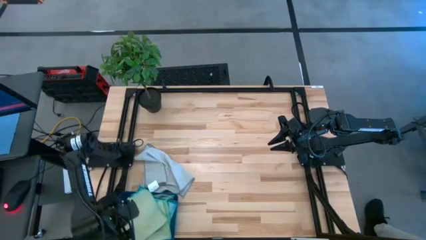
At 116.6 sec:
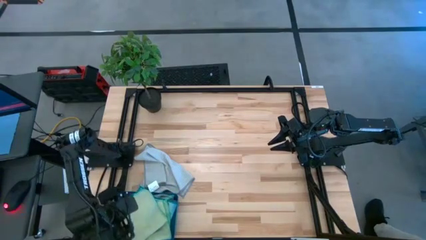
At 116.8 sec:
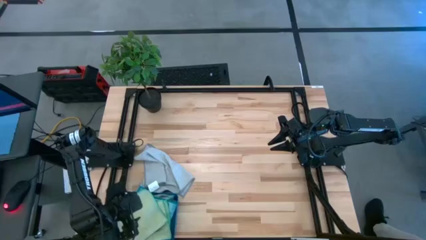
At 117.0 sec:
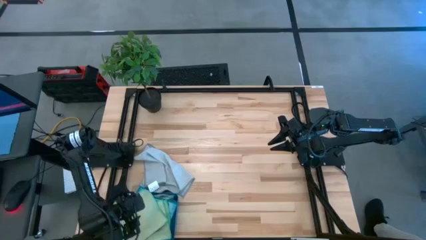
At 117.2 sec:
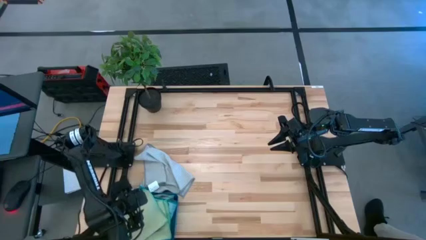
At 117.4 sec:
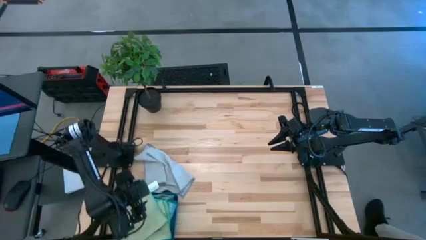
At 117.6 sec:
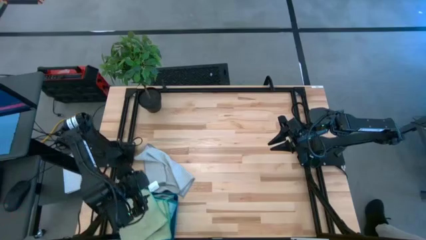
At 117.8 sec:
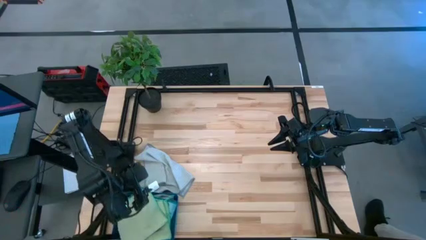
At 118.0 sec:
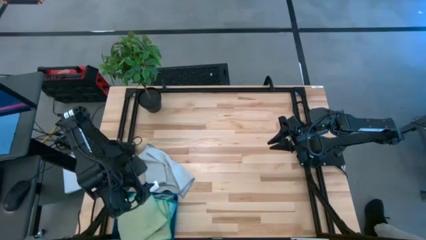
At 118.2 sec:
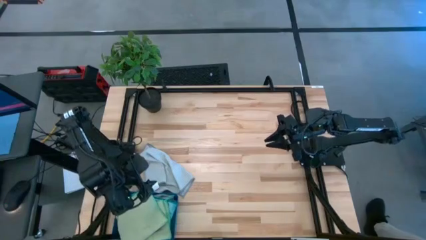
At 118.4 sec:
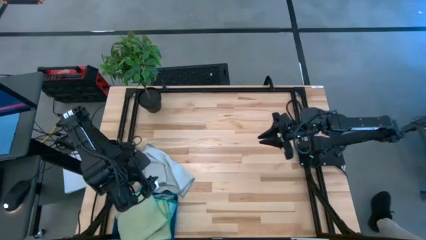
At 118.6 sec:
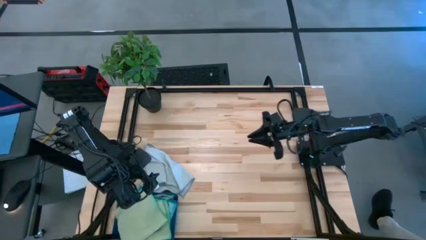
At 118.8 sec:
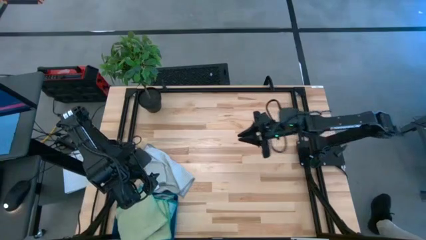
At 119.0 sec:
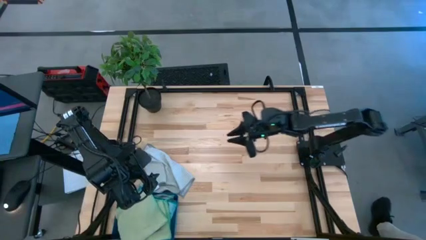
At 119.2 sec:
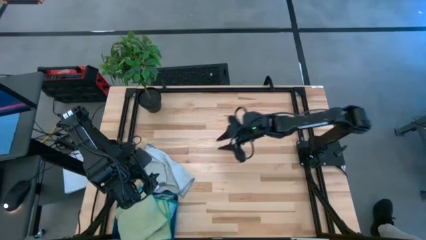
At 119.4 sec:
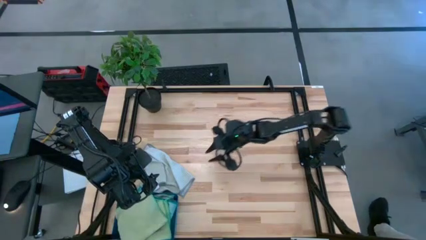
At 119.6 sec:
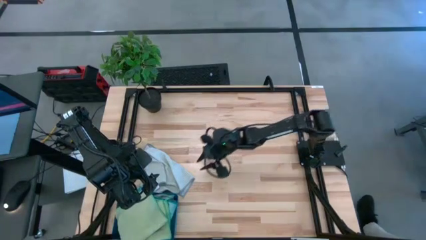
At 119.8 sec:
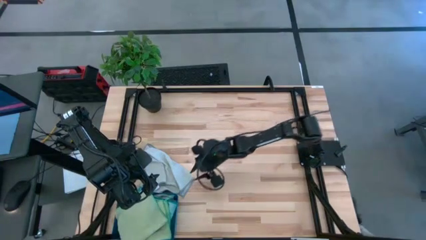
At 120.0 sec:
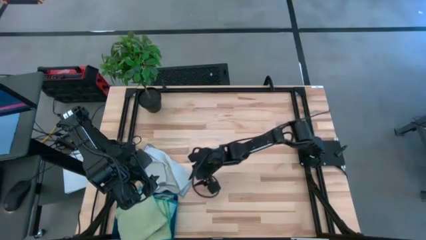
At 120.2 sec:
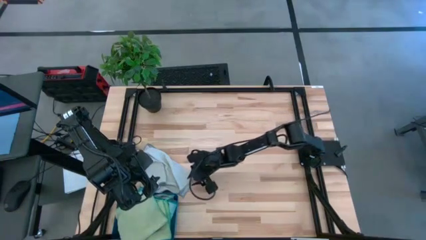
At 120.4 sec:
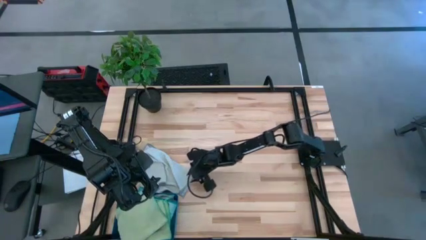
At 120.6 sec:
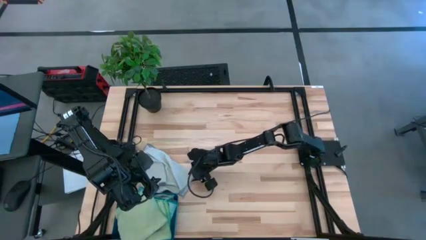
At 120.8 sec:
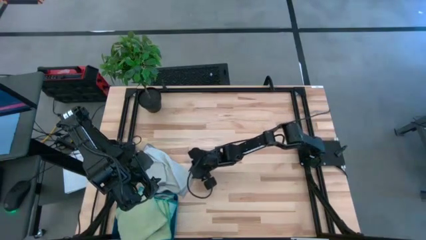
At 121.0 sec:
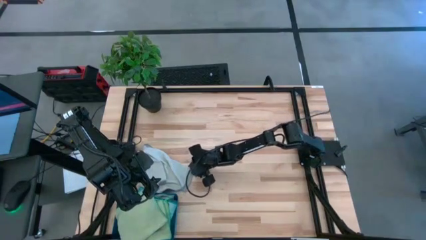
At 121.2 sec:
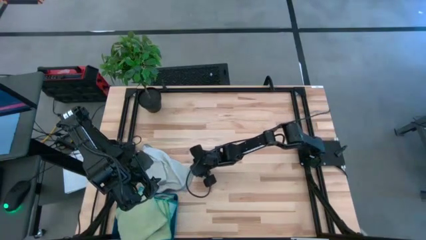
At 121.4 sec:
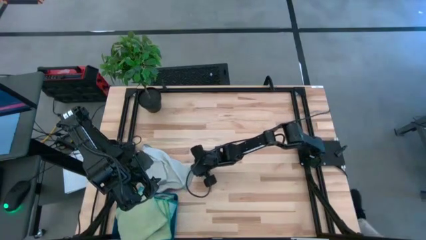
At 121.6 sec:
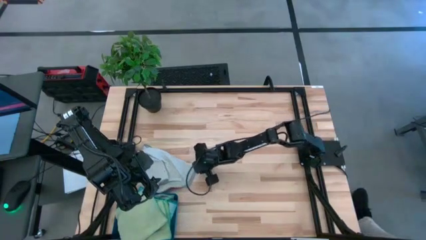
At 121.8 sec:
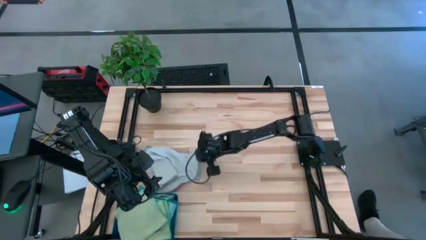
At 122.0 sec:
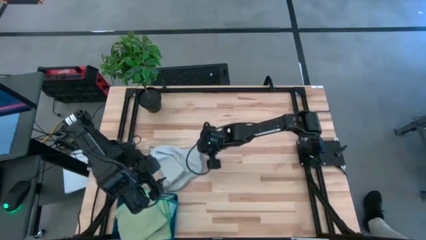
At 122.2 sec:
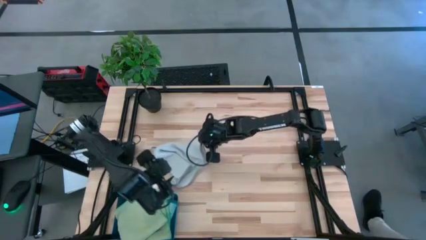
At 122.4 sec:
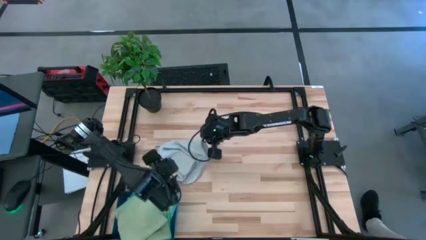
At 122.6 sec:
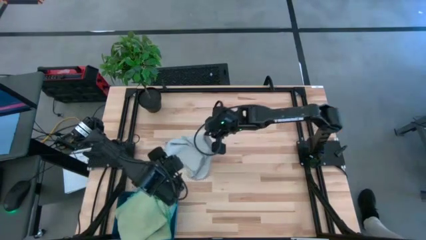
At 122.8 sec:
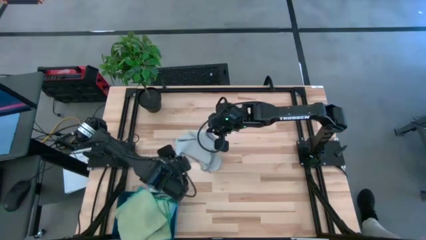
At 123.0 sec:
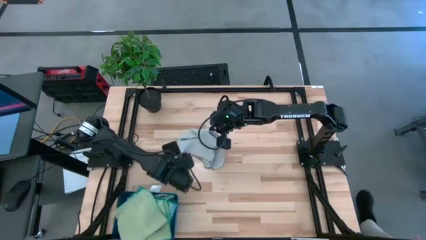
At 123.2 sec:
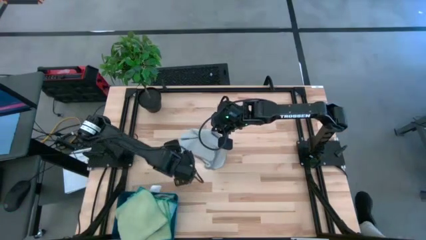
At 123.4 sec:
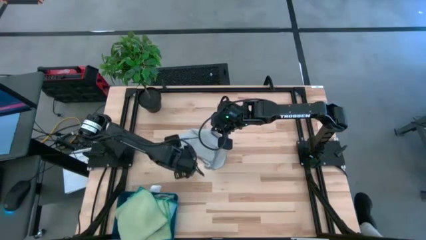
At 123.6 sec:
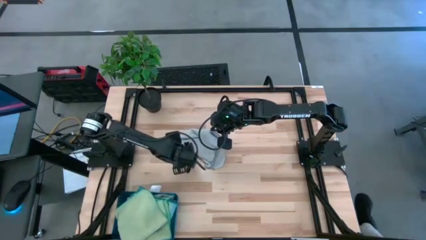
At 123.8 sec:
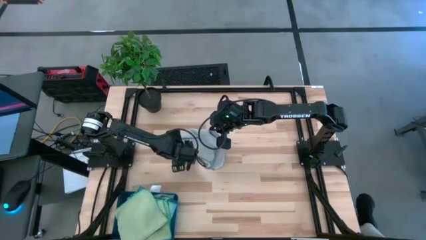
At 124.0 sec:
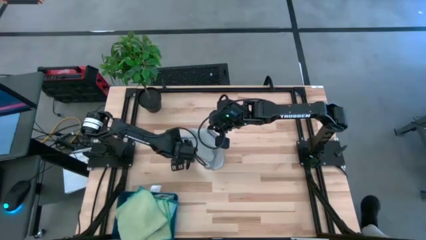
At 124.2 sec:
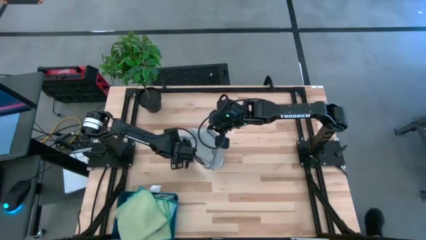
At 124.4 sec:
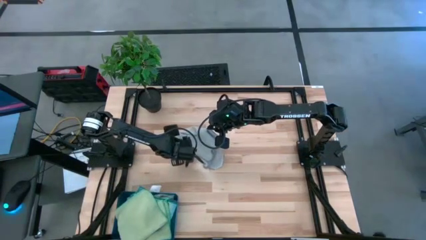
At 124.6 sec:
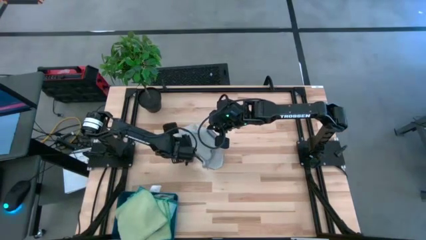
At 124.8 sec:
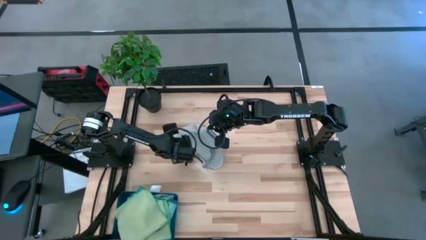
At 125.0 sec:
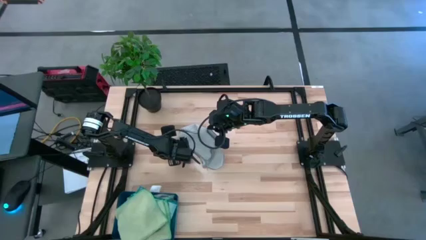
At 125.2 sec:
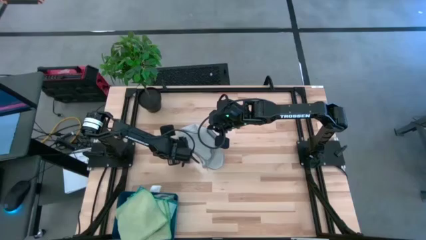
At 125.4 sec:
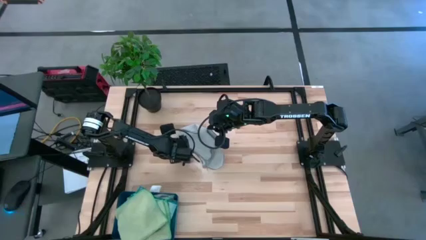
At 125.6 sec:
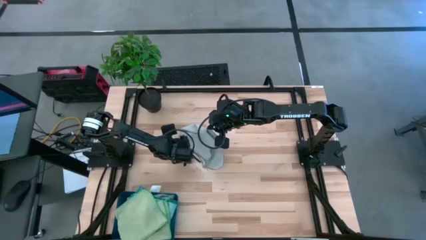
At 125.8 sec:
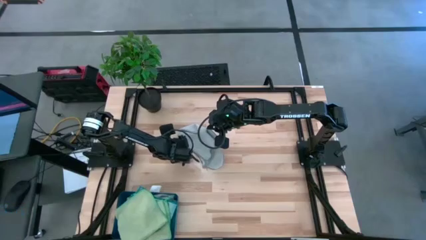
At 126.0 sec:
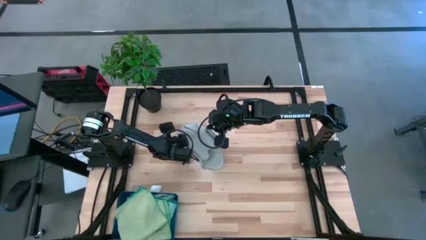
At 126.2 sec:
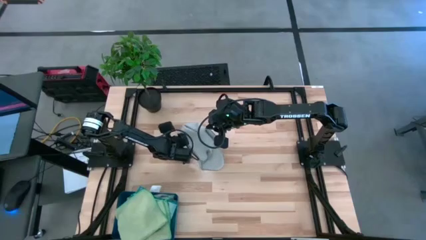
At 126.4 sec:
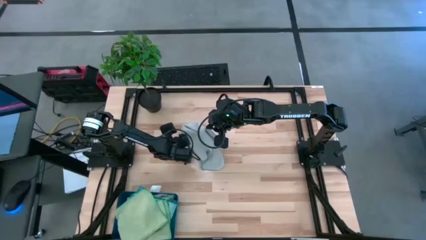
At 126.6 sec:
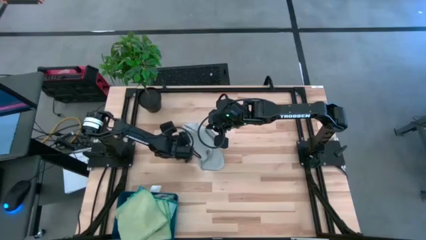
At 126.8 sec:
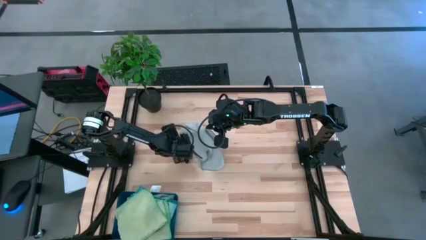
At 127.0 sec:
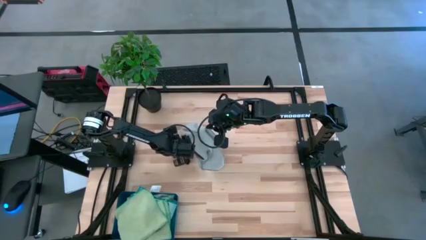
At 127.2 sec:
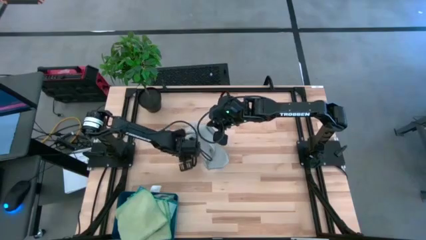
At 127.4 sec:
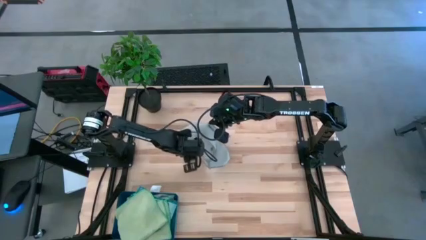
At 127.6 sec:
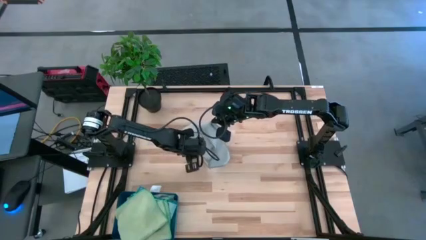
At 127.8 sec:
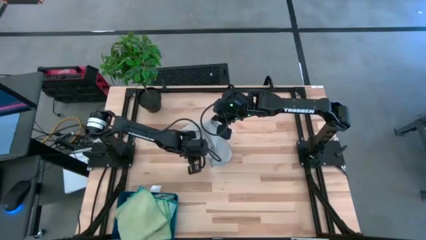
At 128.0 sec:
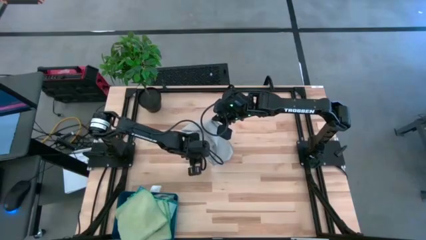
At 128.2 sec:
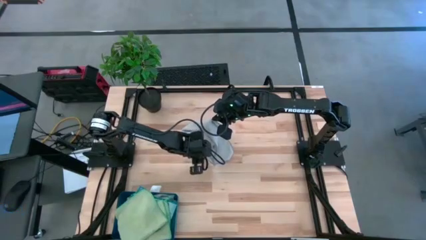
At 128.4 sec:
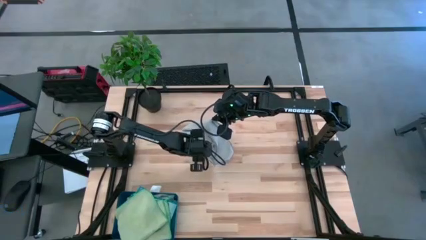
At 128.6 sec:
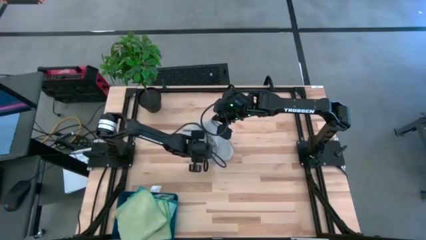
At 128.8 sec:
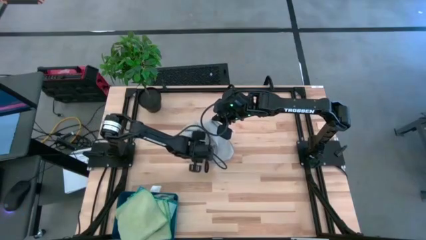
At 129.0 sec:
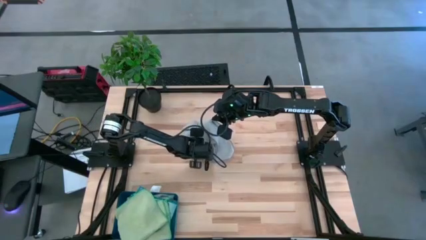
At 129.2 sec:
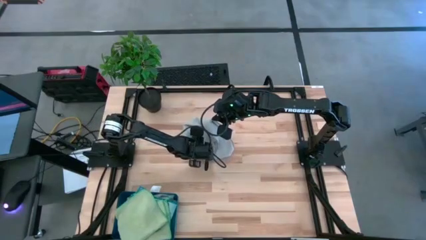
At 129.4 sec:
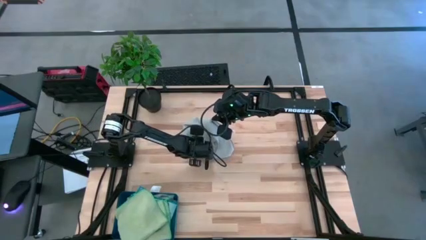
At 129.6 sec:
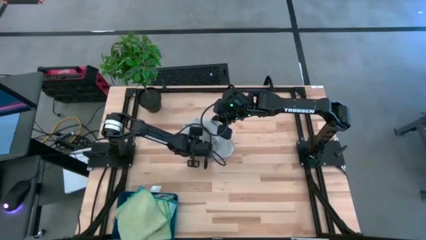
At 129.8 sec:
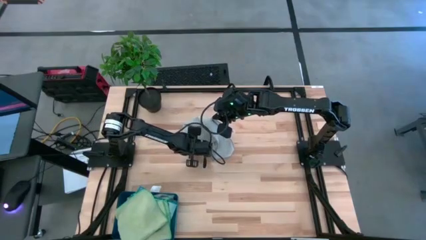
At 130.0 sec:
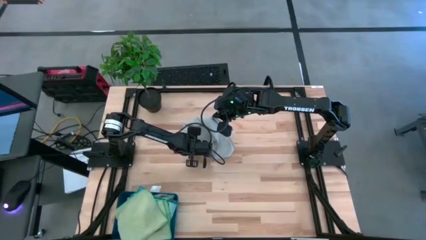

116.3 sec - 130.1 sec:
Task: Fold microfiber towels
Fold the gray microfiber towel

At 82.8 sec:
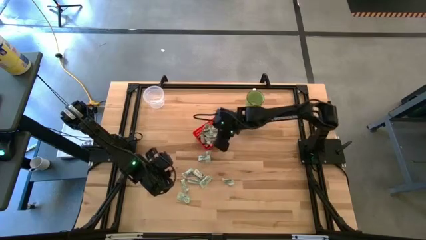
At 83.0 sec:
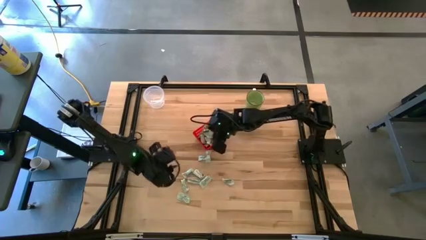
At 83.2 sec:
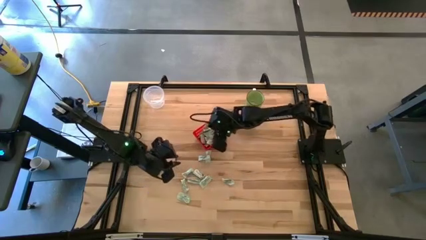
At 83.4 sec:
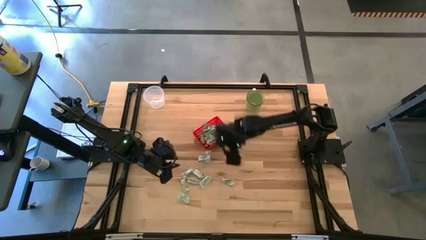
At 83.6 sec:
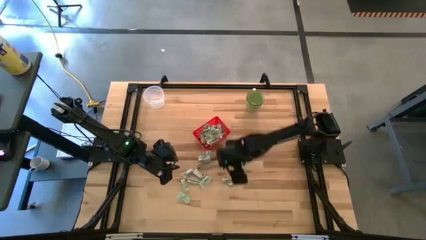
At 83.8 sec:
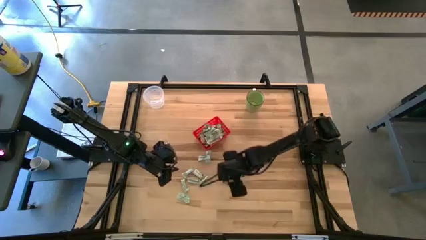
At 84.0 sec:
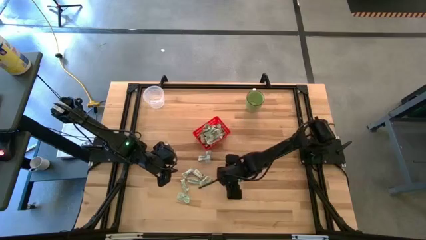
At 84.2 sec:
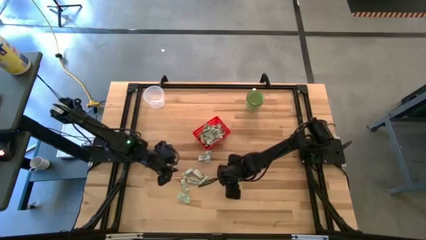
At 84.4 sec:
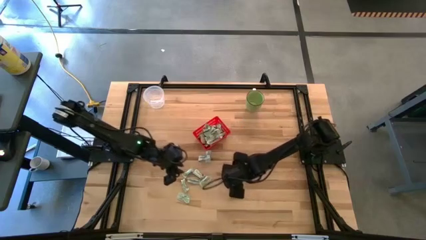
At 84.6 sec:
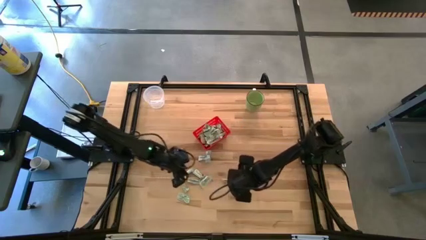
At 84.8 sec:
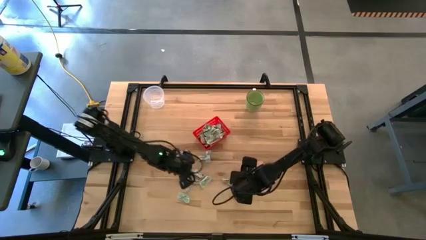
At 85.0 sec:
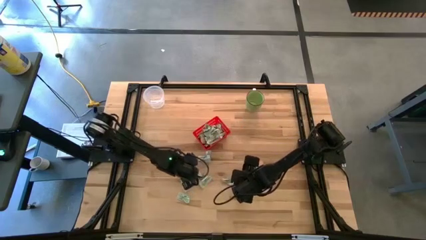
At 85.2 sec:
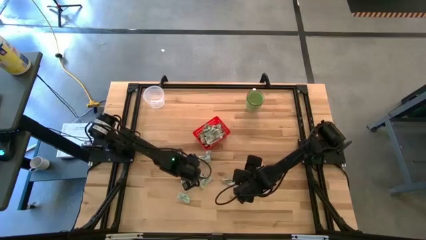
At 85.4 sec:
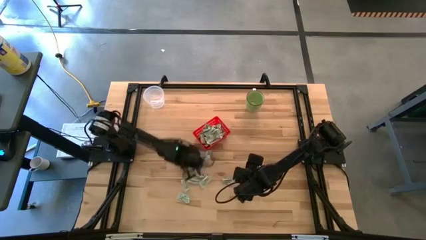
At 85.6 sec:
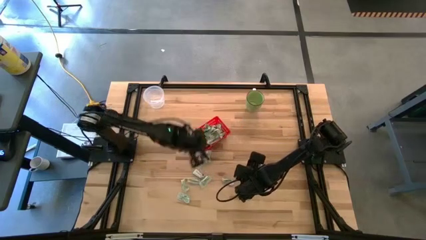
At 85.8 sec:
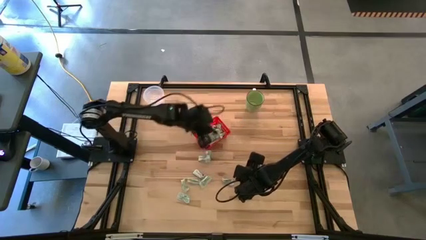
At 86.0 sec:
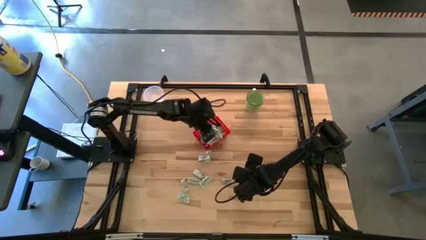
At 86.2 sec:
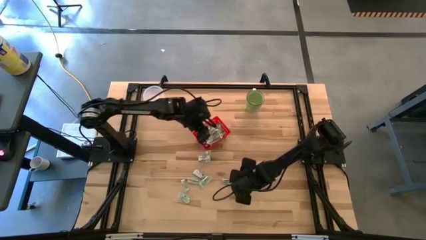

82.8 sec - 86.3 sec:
Task: Pick and place Stevia / Truvia into bins
Put the stevia packet into the red basket

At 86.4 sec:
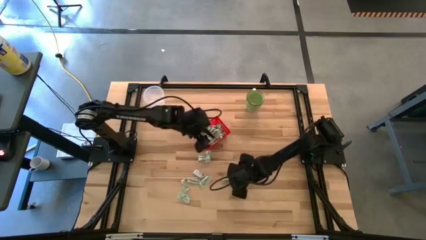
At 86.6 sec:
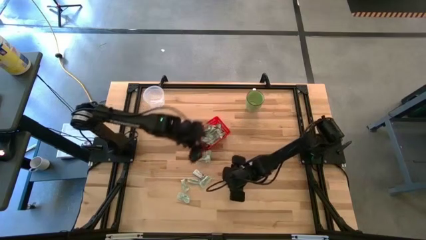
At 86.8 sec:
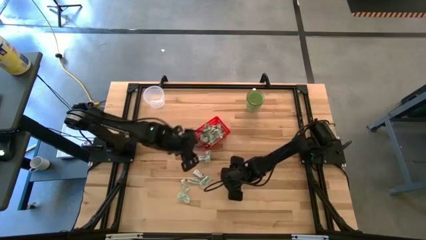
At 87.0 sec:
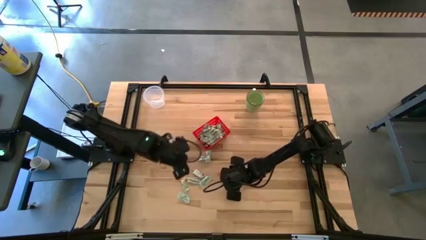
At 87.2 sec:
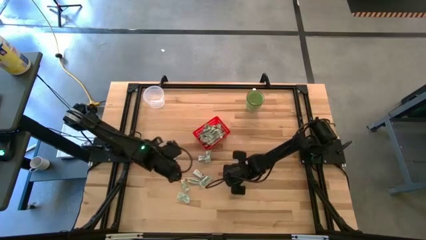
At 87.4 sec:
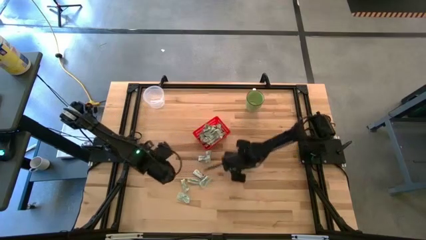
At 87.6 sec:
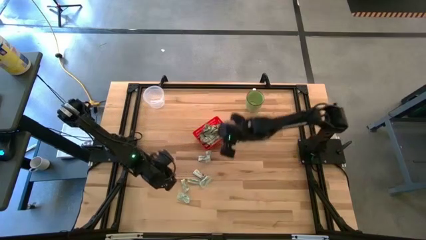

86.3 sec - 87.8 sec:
Put the stevia packet into the red basket
